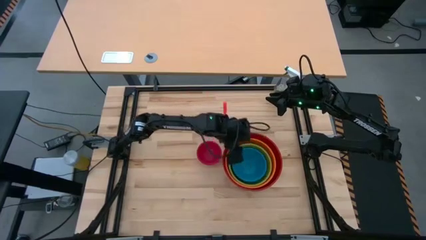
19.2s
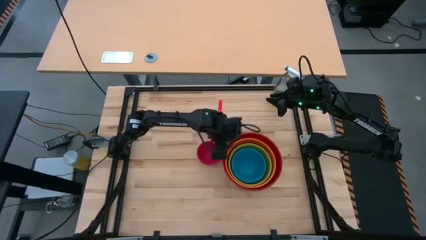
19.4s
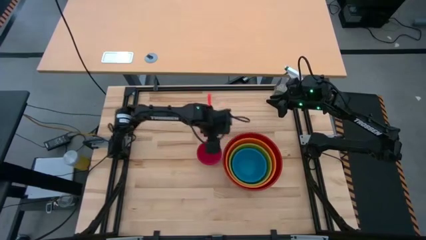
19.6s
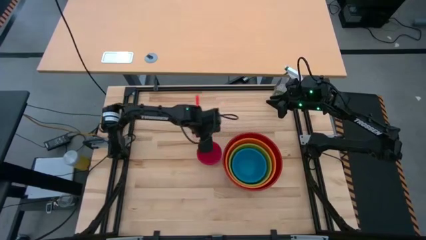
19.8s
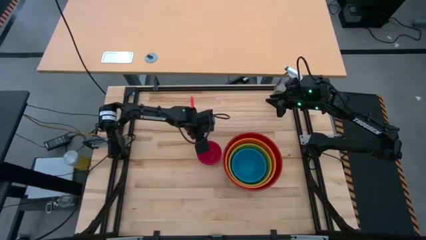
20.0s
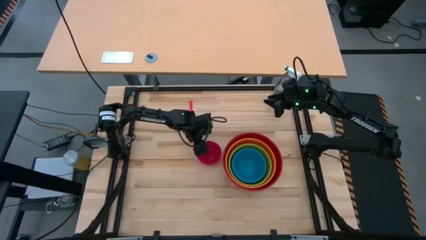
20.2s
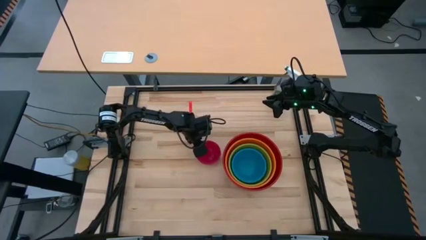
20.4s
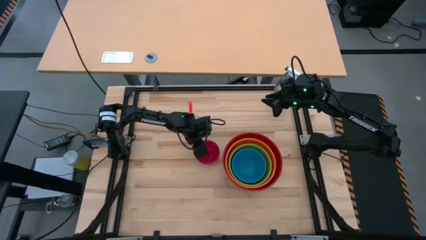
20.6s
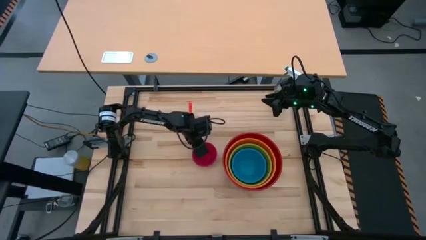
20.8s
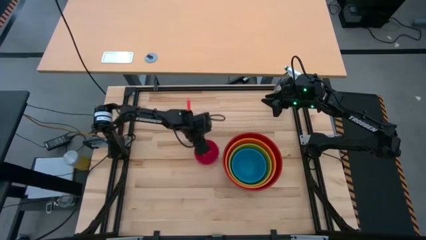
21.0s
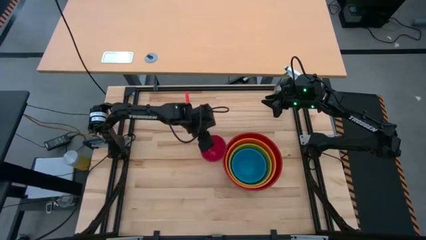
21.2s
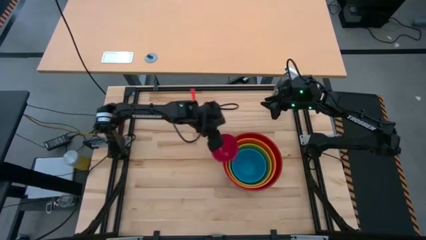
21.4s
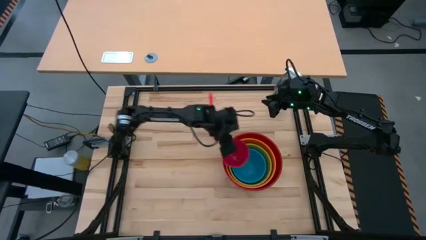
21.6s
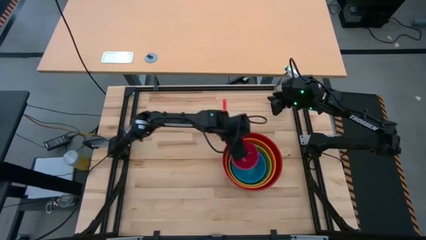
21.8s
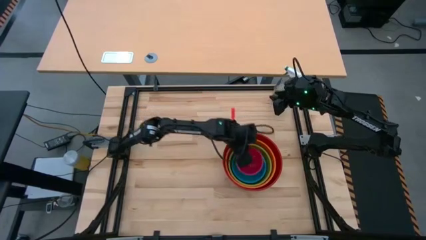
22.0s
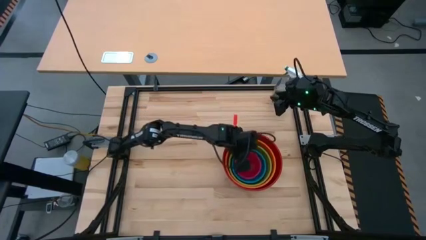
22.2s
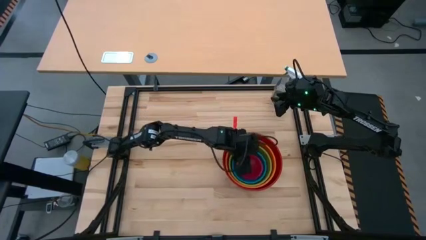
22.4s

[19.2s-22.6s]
Stack the pink bowl on top of the blue bowl

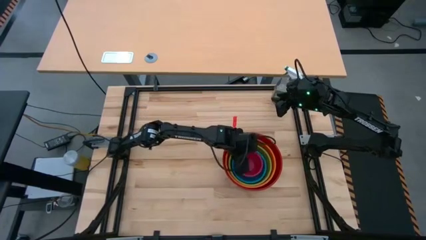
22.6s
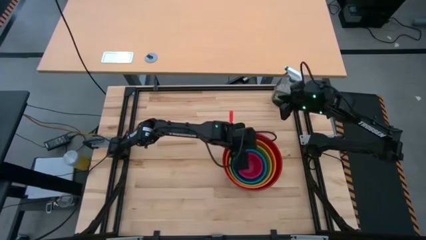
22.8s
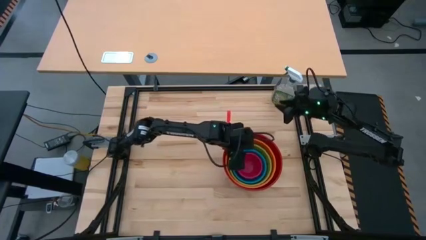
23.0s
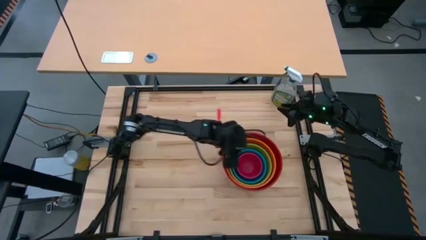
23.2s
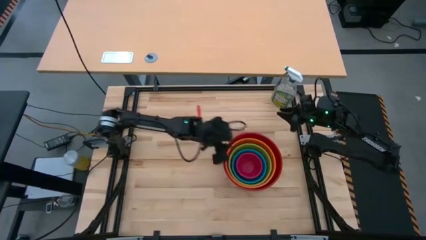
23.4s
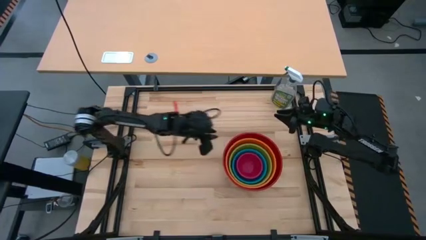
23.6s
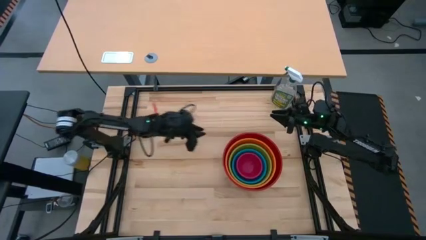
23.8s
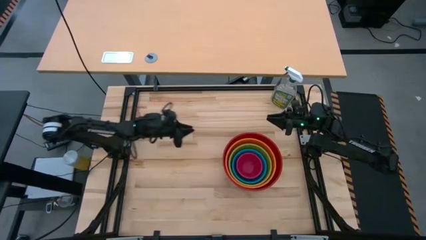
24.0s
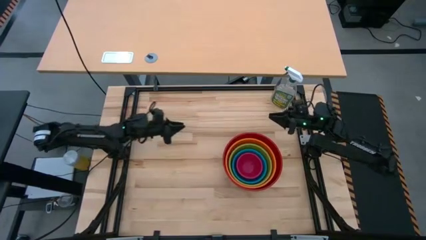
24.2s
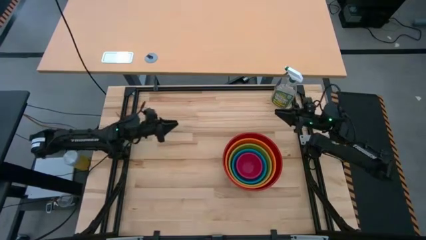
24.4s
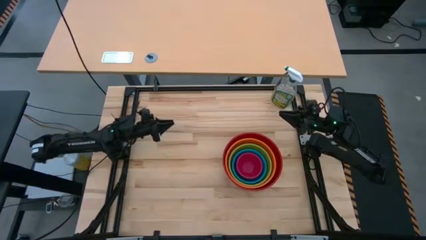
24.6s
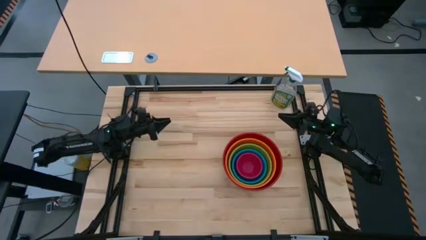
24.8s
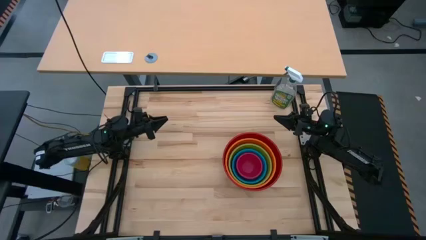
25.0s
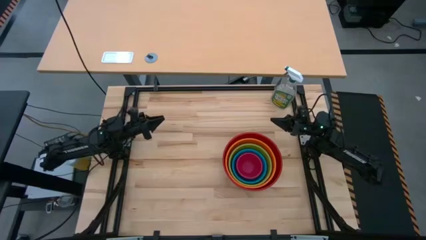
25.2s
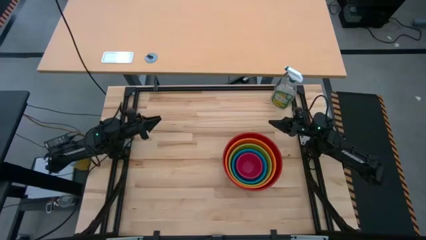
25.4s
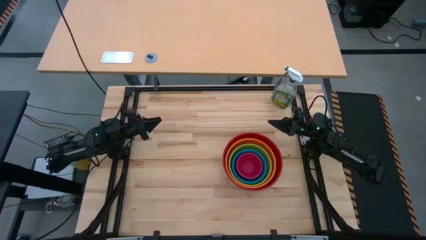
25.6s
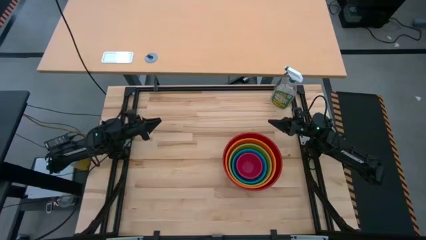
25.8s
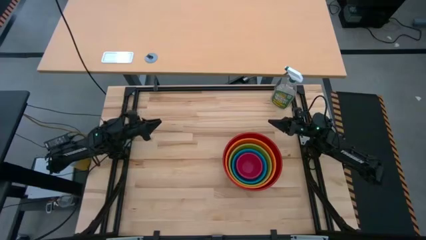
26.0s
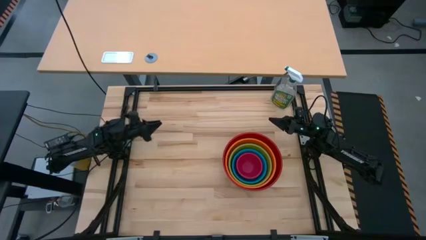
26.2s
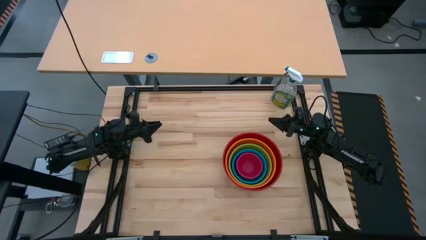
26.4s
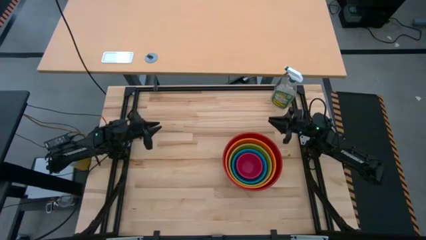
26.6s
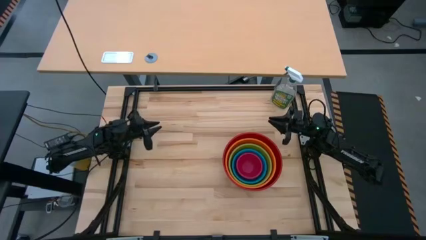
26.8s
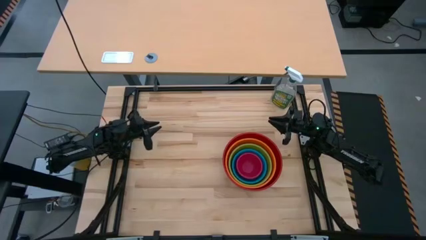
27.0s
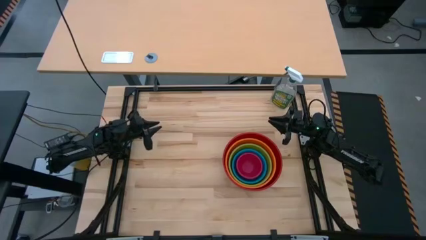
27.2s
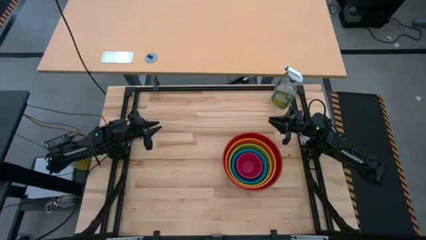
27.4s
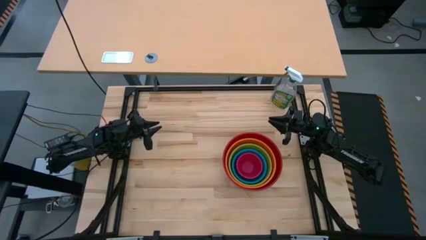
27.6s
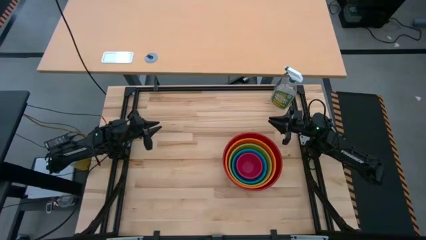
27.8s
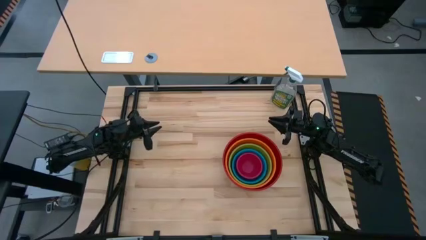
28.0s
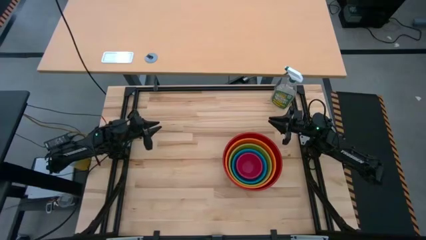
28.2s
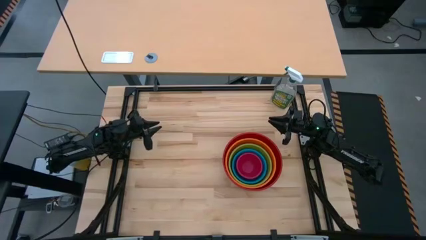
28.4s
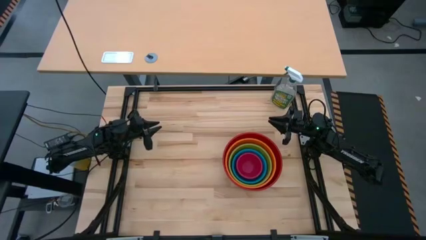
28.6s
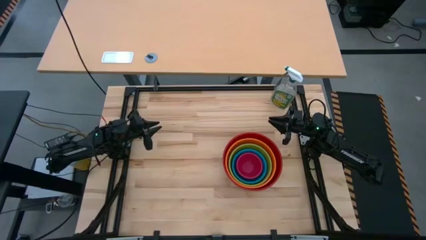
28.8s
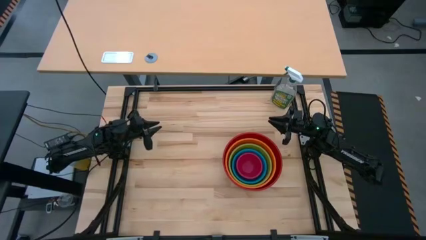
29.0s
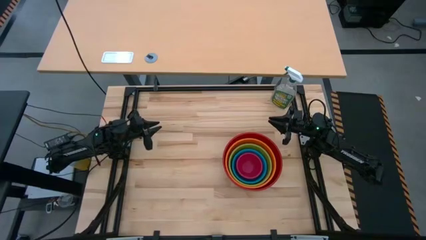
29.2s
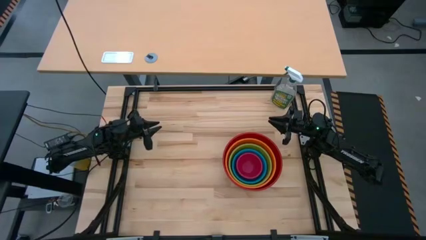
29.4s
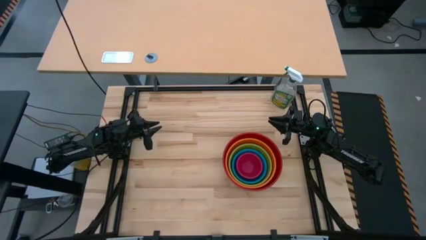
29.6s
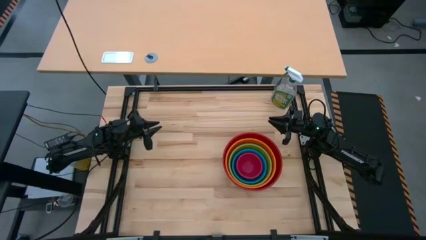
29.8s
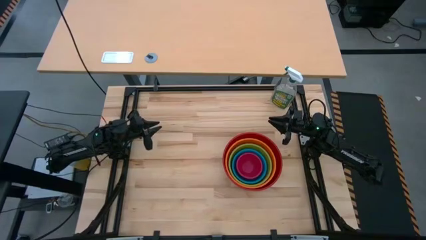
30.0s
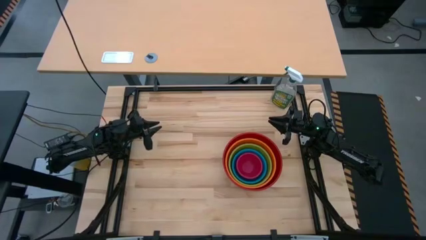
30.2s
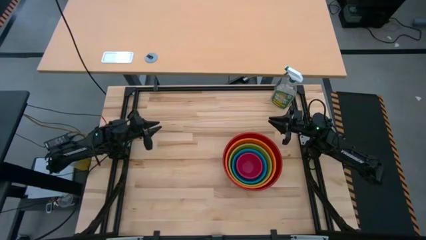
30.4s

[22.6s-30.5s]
Return to Home Position

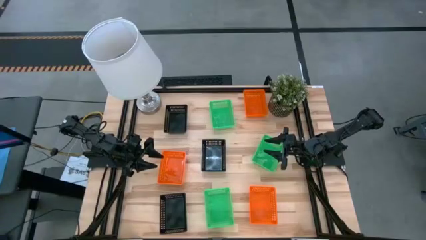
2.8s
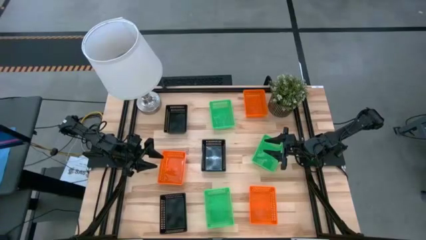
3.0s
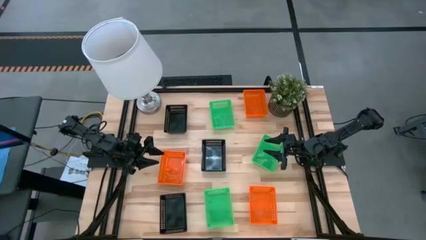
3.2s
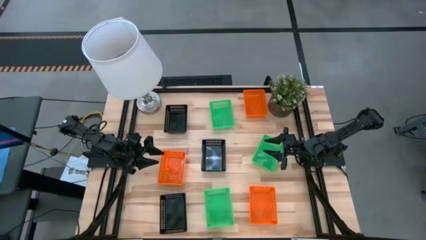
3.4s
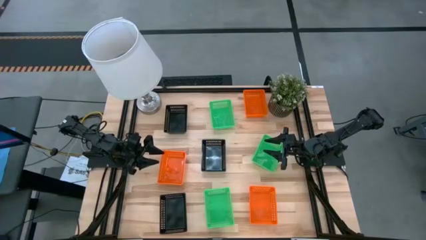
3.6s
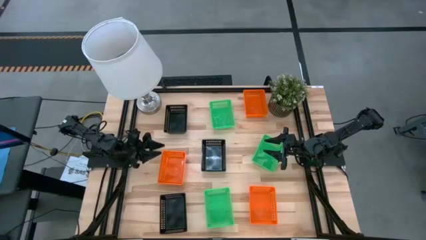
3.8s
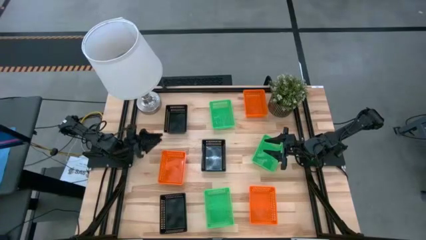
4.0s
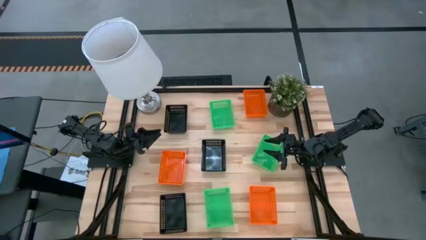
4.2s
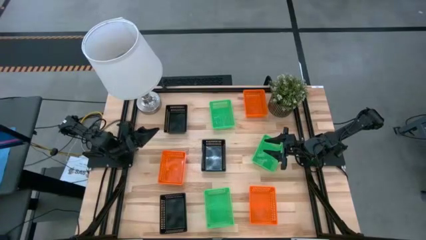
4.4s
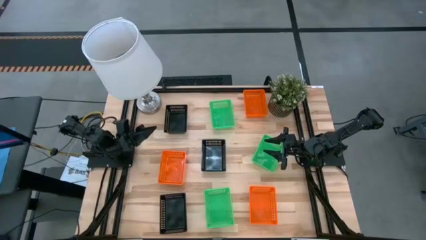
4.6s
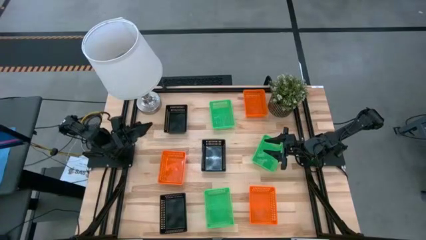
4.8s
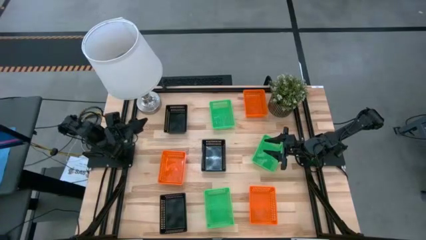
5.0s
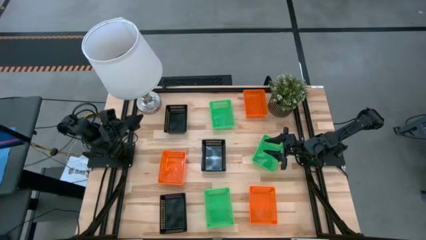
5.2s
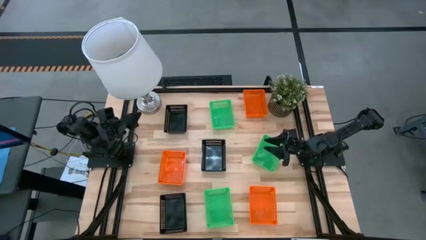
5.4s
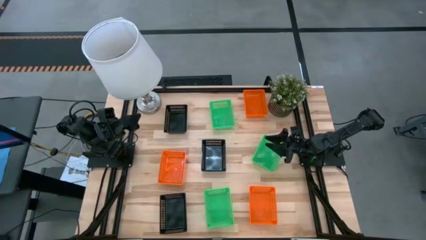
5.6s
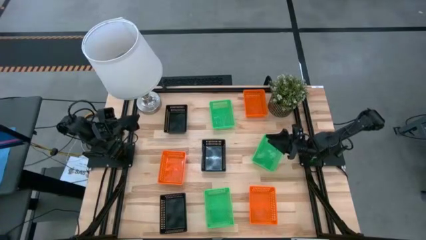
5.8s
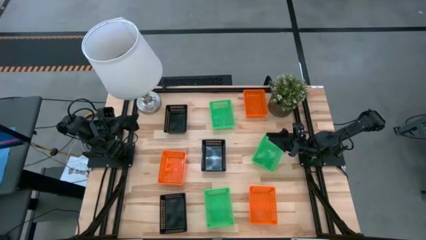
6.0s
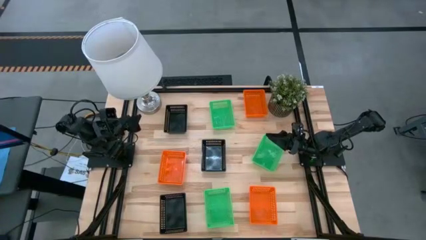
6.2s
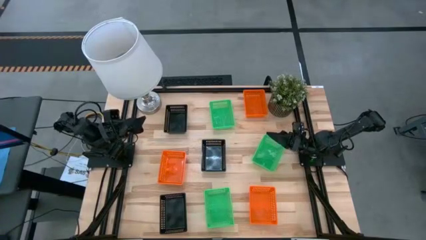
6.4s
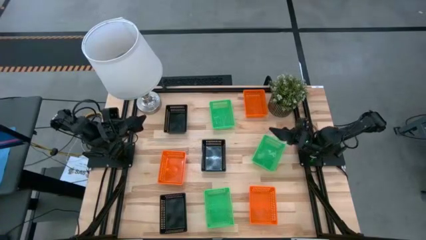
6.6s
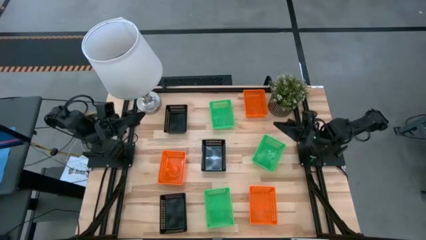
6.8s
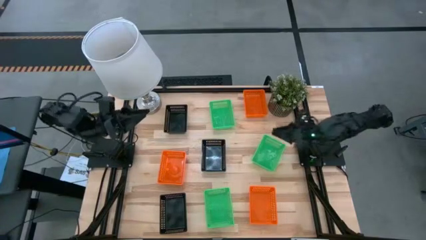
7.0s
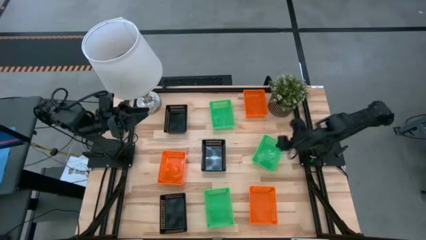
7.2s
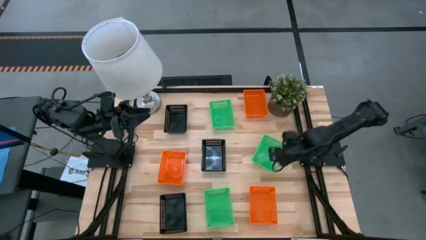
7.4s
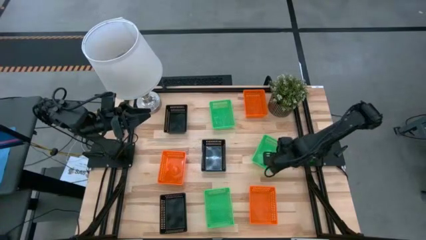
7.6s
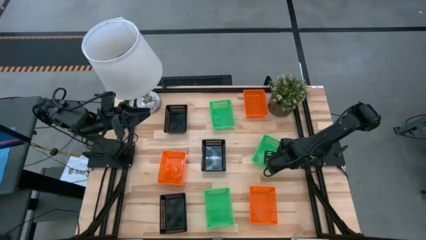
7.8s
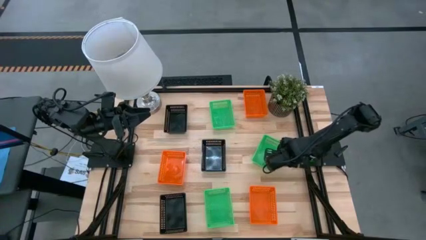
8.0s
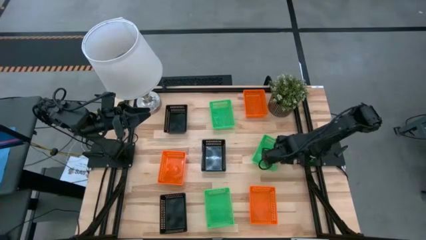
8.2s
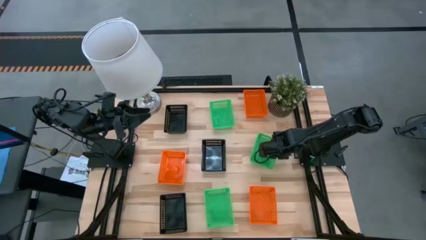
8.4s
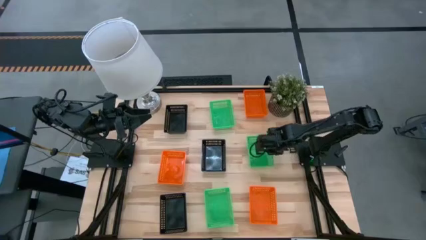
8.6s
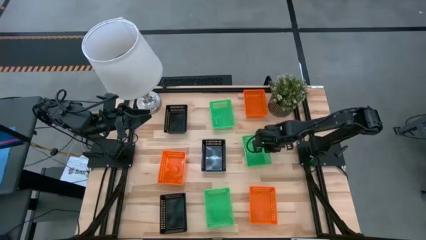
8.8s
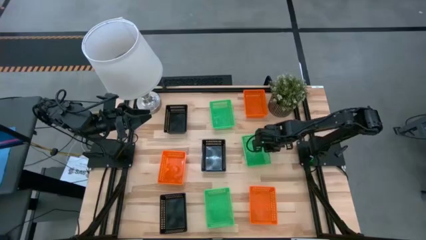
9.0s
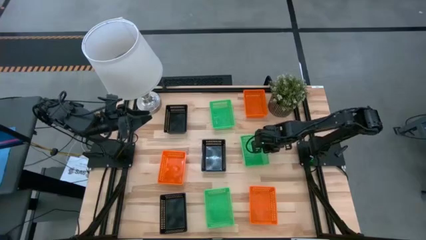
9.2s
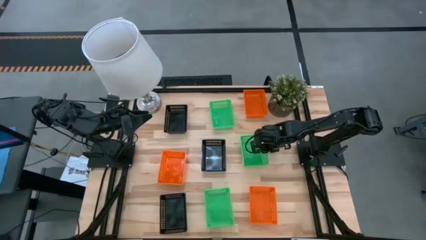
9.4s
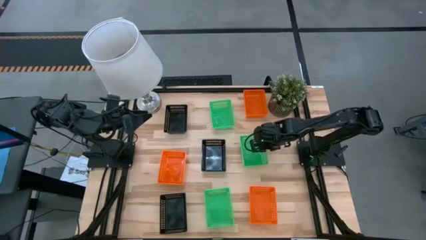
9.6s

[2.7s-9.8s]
Adjust the middle right green bin
